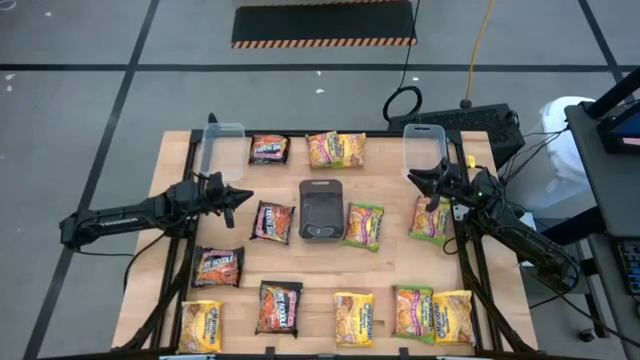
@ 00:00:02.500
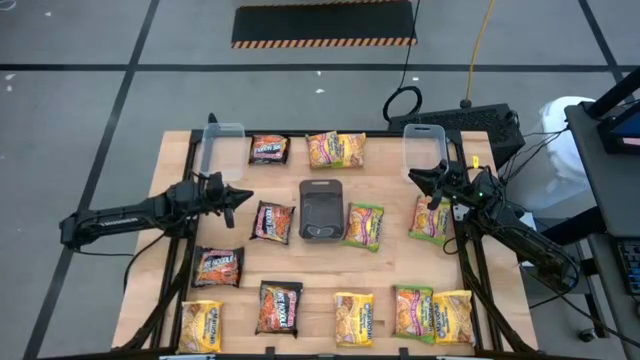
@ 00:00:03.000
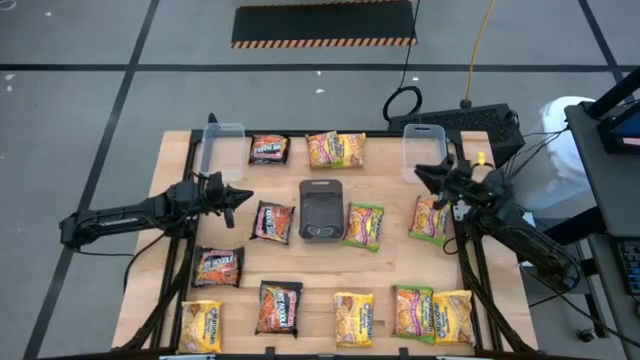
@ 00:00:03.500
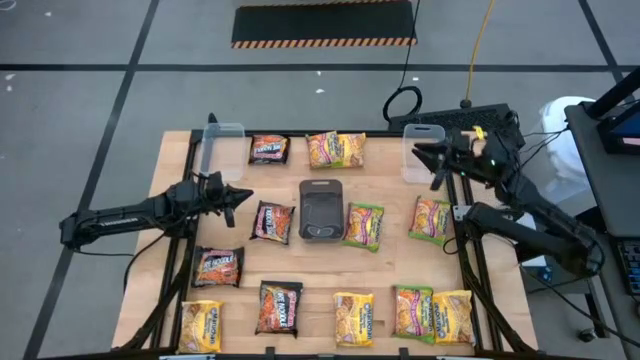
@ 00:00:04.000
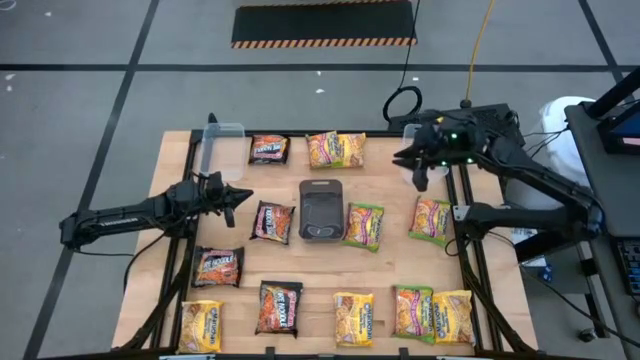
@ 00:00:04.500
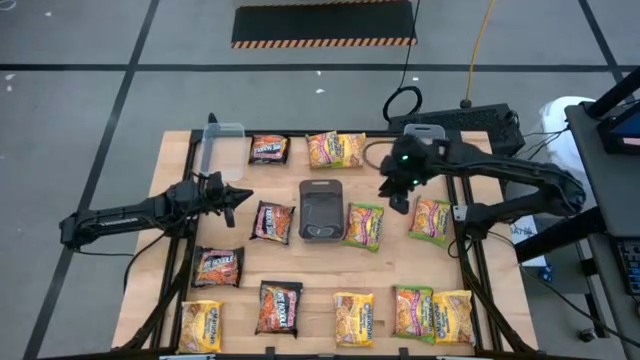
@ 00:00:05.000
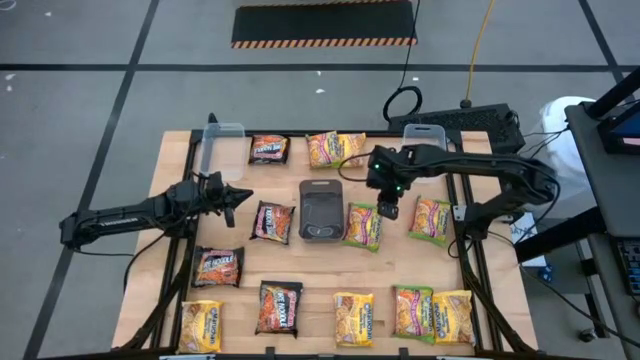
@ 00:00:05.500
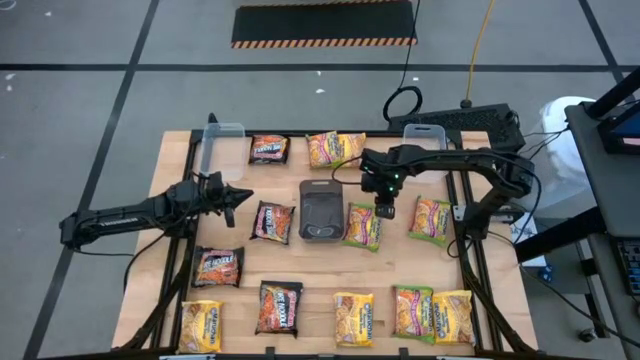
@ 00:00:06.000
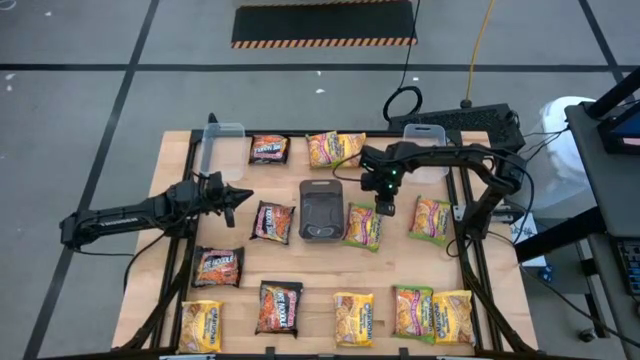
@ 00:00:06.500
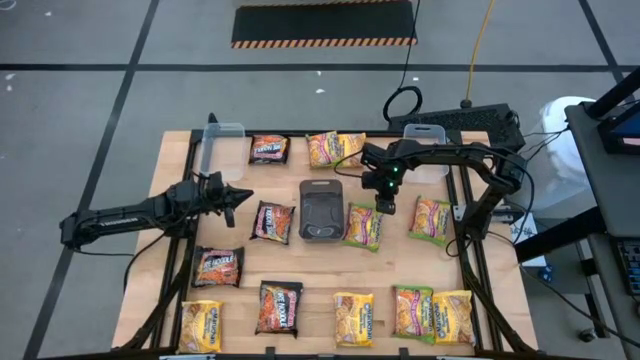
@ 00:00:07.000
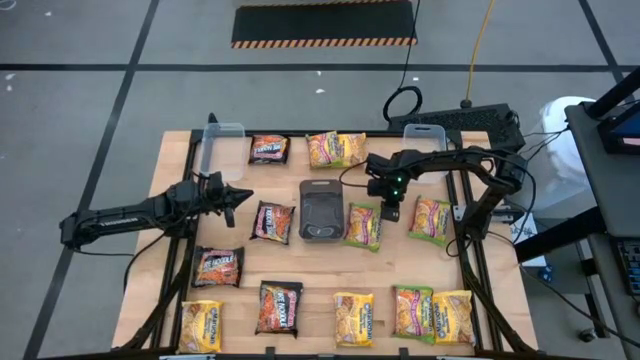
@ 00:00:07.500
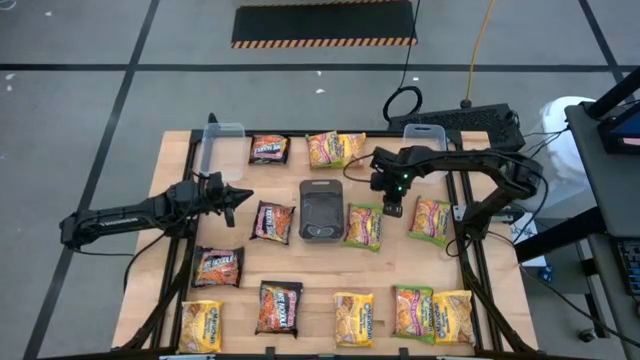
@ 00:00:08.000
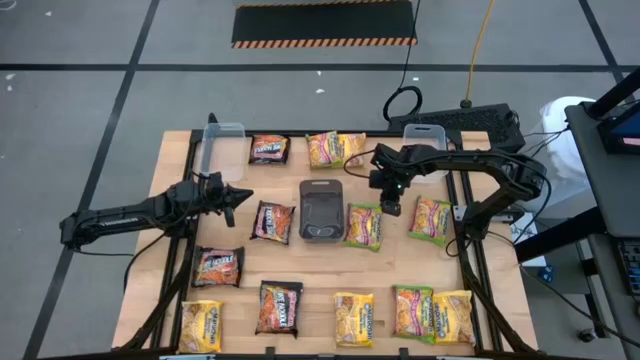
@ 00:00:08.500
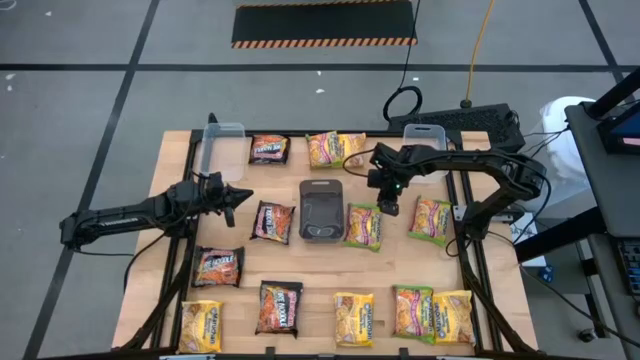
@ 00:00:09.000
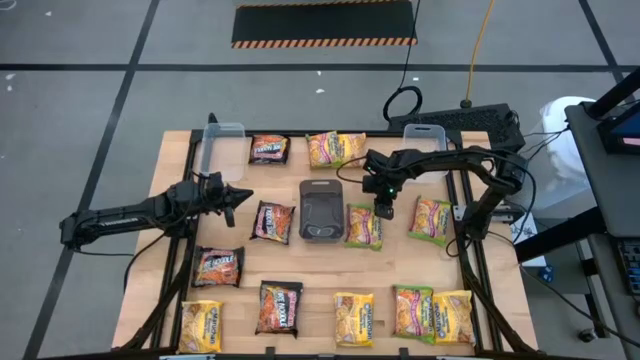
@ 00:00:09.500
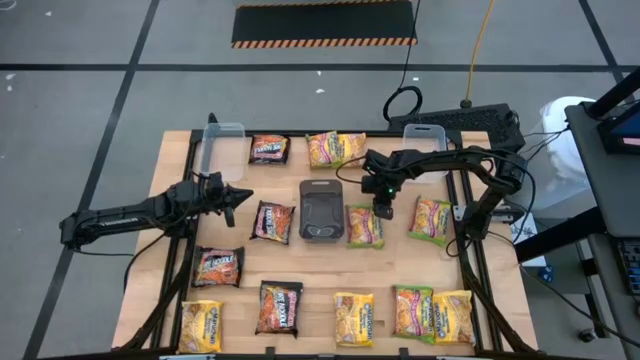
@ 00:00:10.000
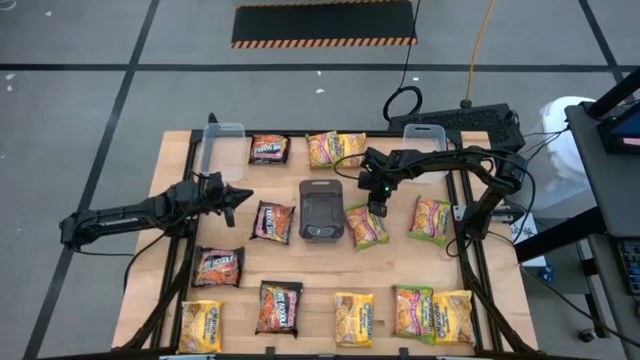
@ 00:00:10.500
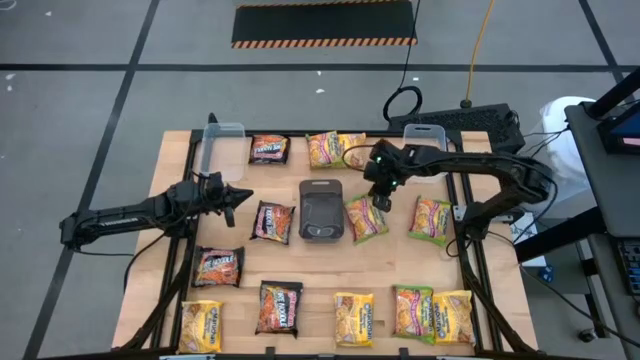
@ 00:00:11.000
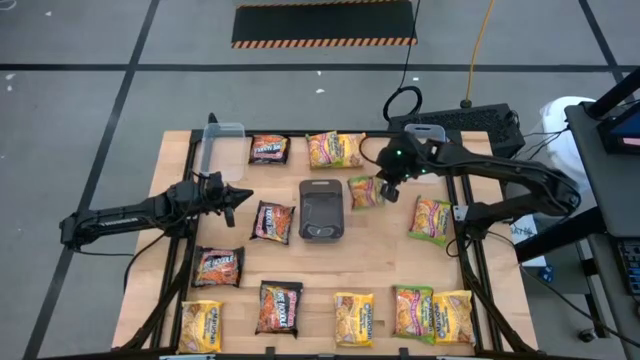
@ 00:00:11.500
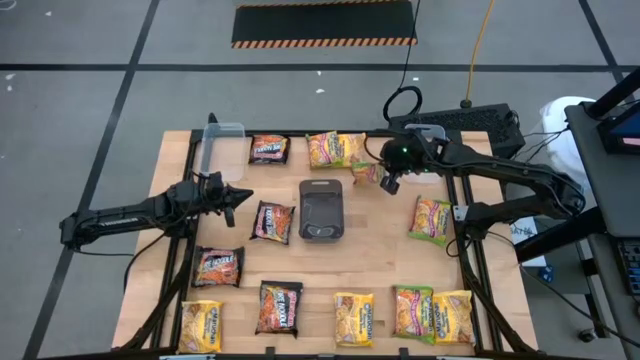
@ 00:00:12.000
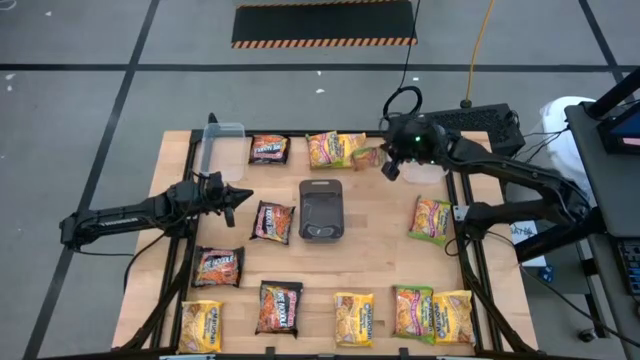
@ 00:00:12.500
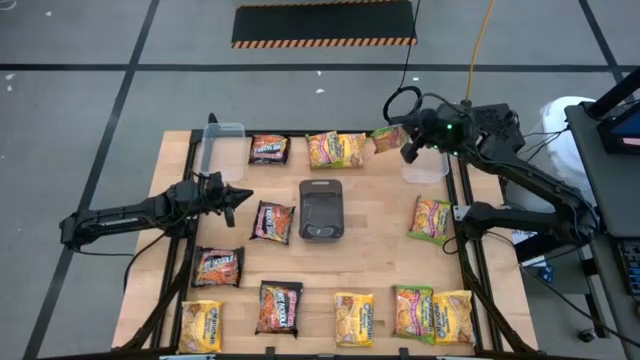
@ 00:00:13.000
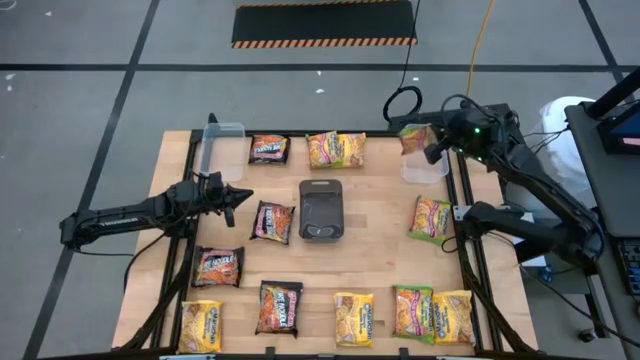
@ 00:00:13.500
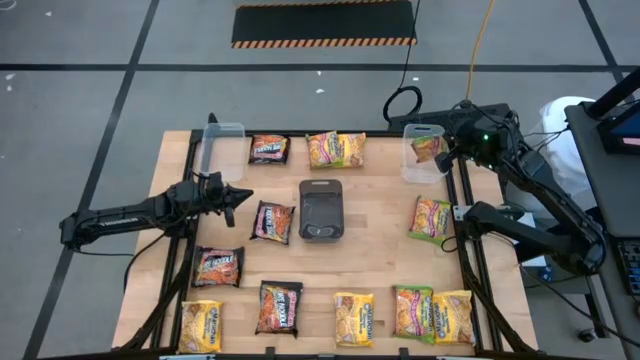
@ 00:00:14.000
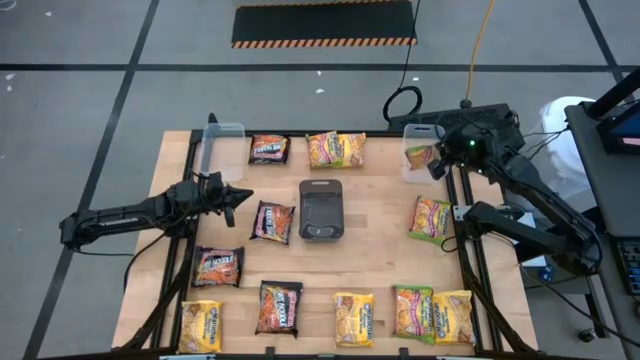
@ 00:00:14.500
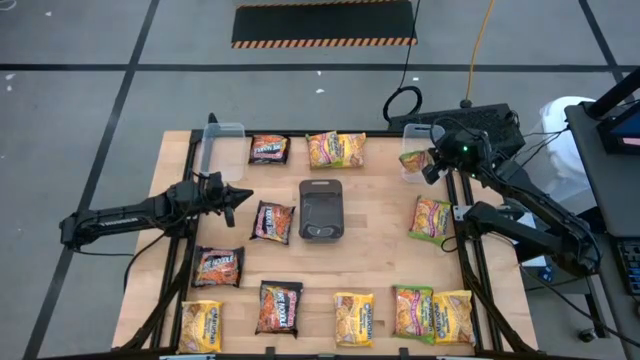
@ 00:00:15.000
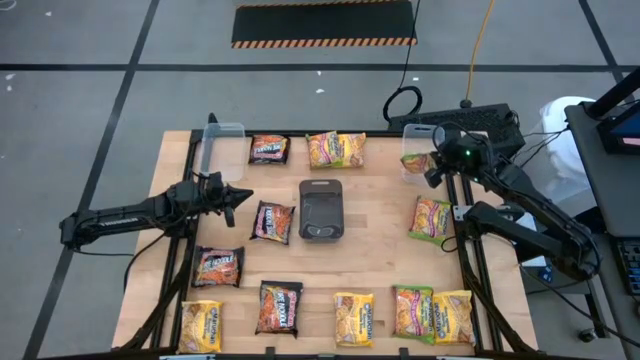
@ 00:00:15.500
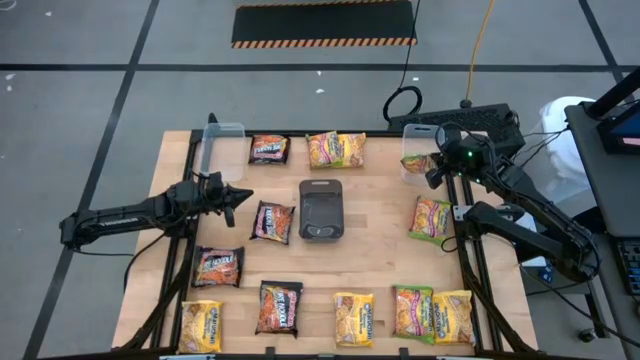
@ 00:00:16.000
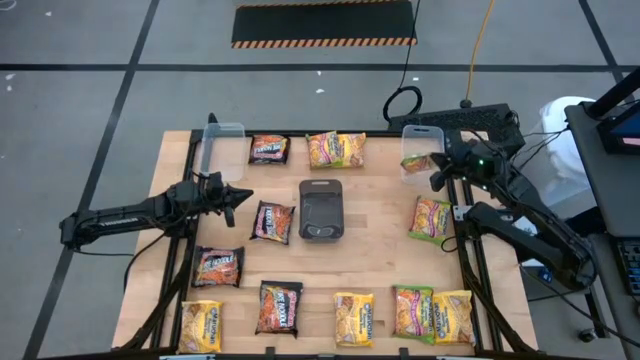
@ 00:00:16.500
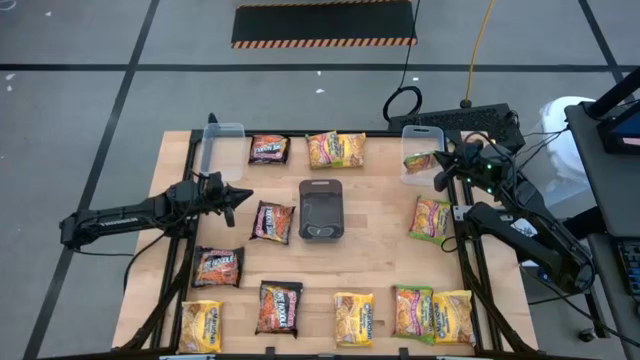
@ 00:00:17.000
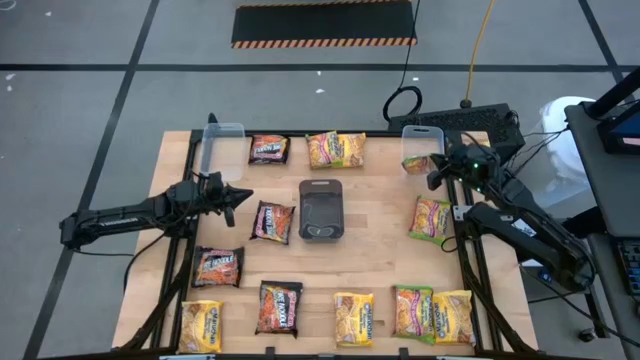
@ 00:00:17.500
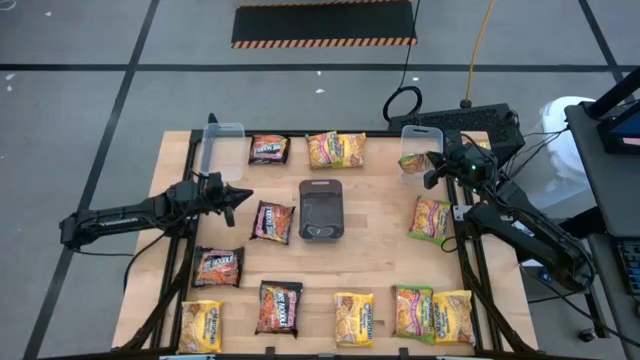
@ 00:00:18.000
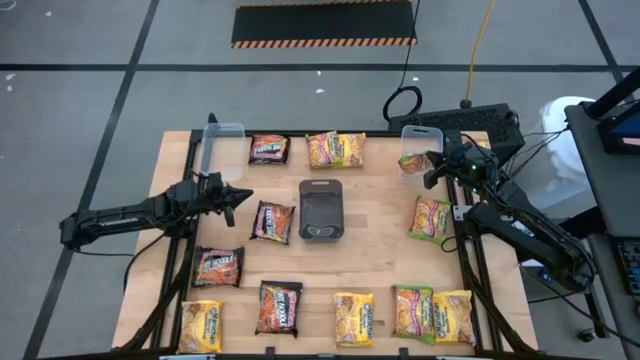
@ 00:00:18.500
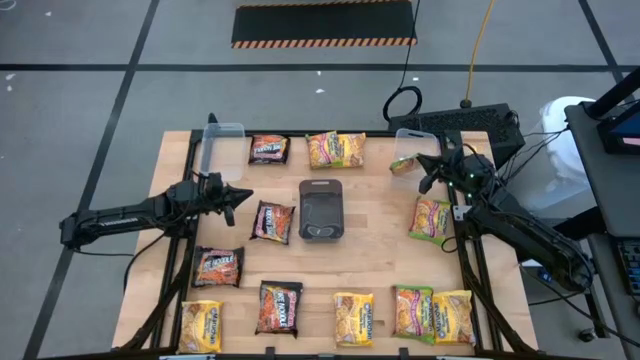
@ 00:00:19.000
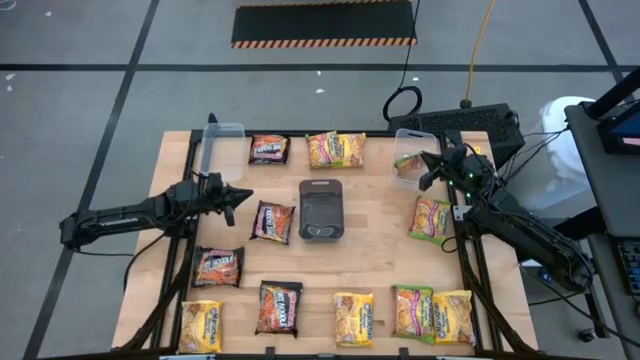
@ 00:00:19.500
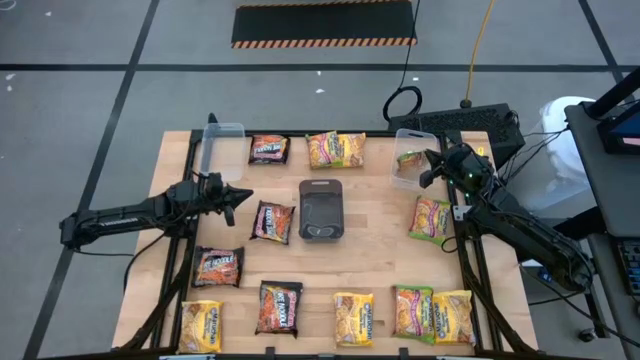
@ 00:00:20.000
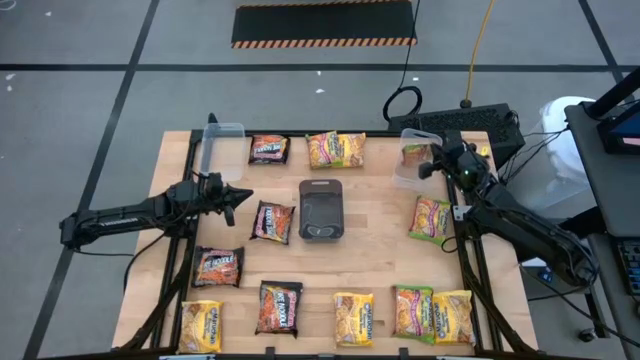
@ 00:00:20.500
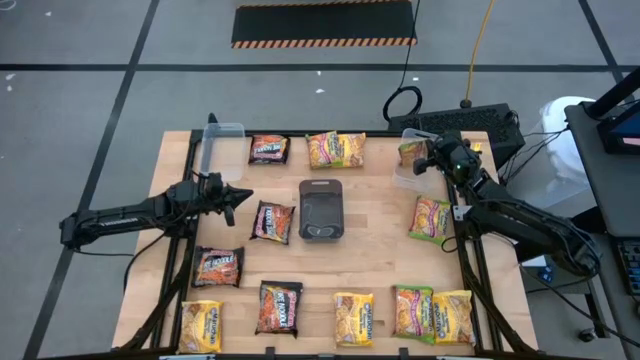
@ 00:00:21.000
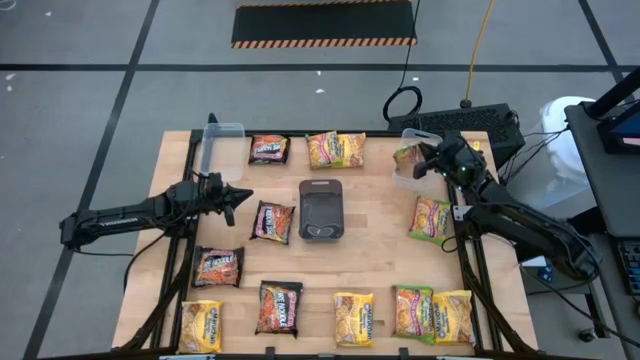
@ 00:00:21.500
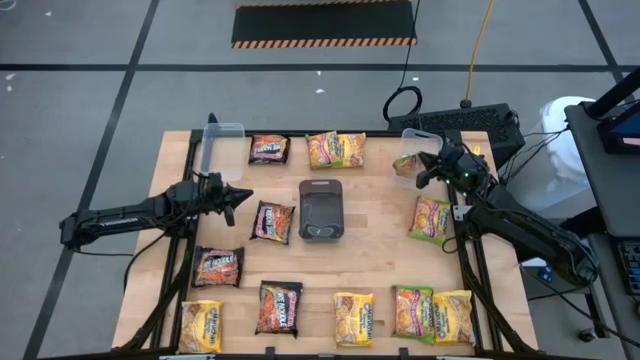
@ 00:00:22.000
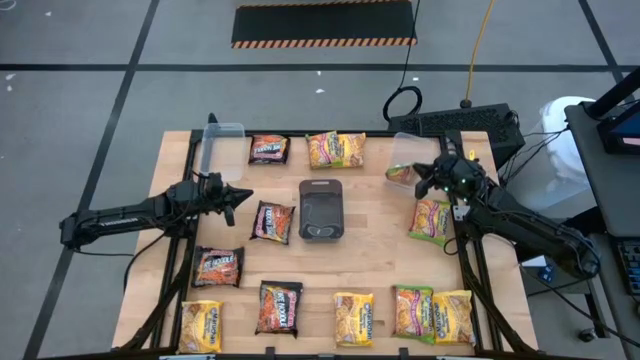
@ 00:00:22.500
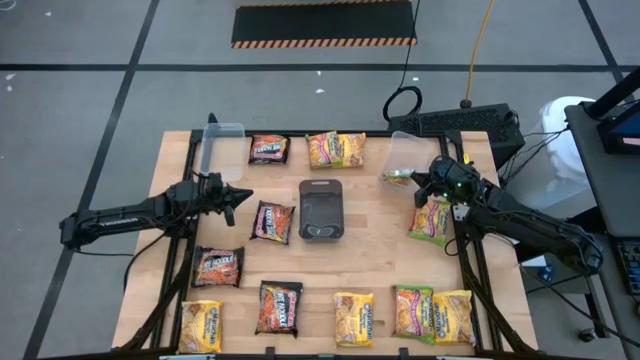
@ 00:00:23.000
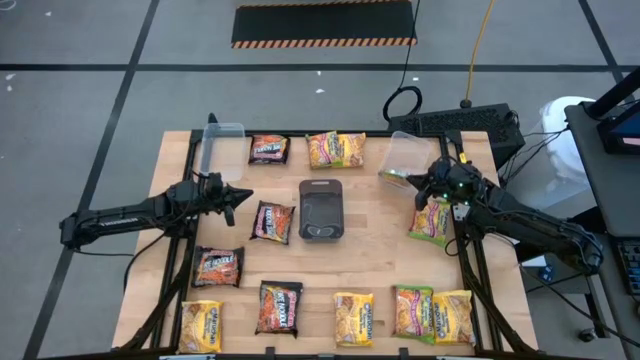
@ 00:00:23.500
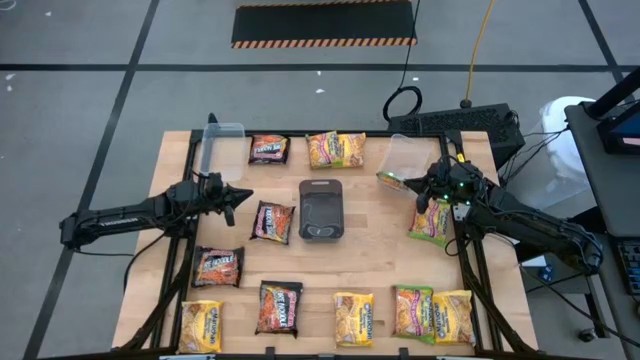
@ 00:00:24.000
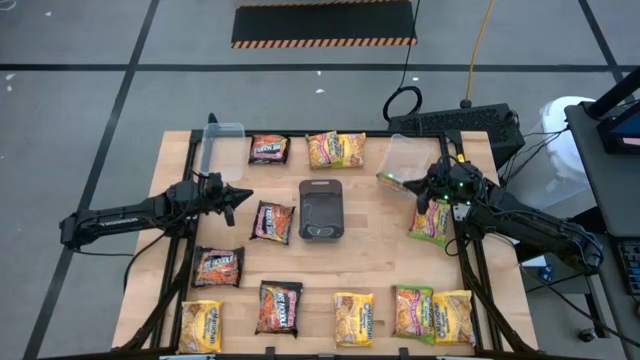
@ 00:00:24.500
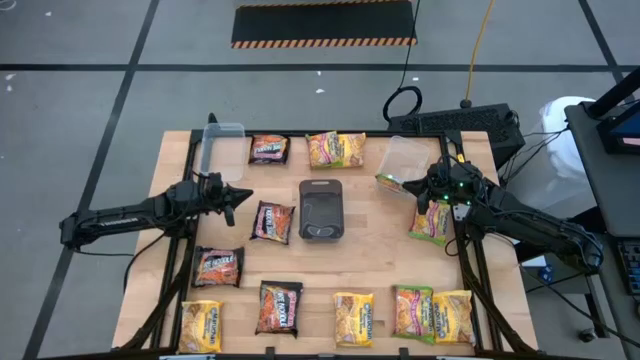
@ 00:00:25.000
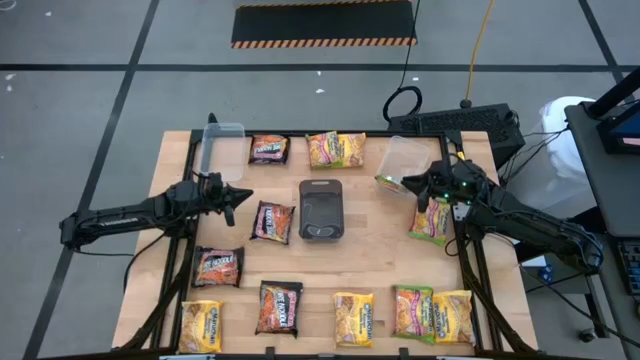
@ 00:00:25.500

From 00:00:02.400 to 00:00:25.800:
Task: Sort Maruchan noodles
Put the middle left green noodle pack into the right transparent bin
